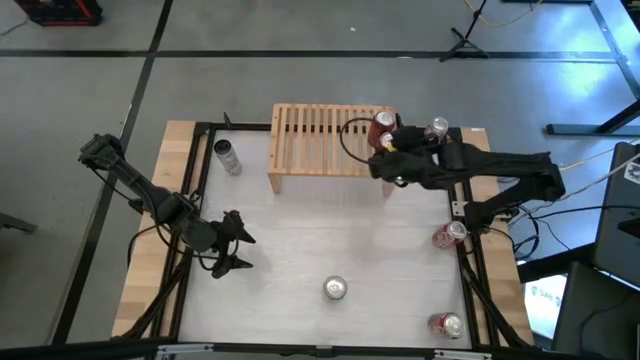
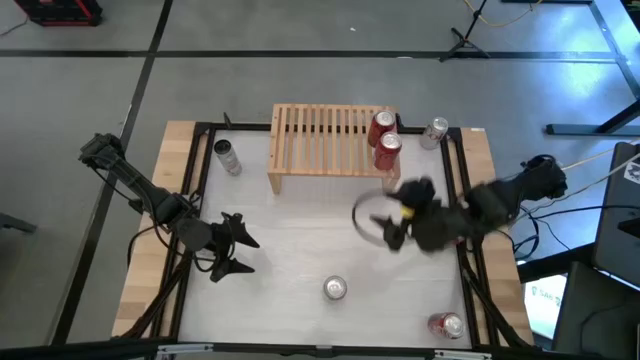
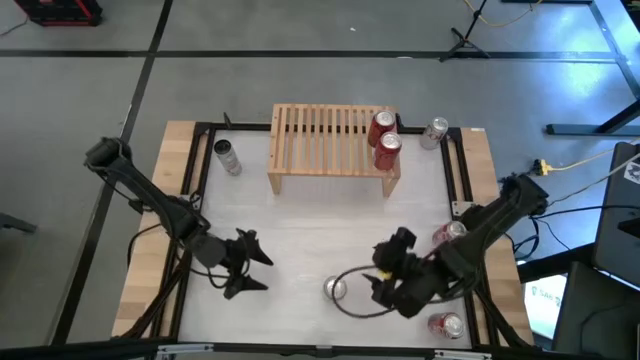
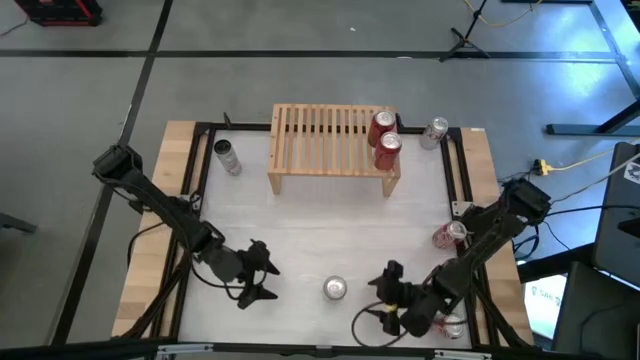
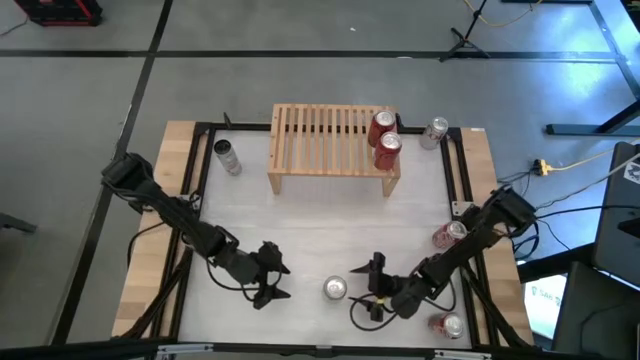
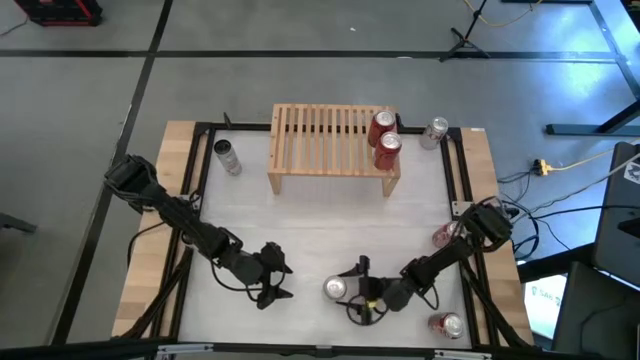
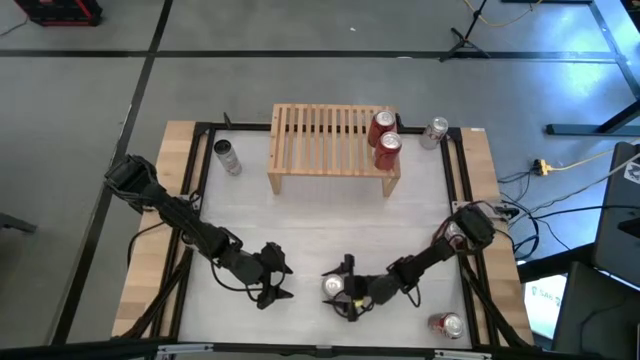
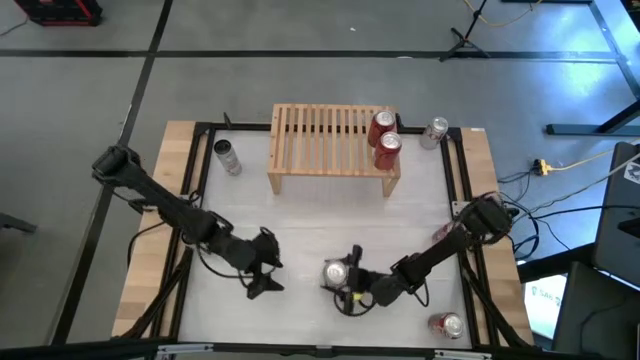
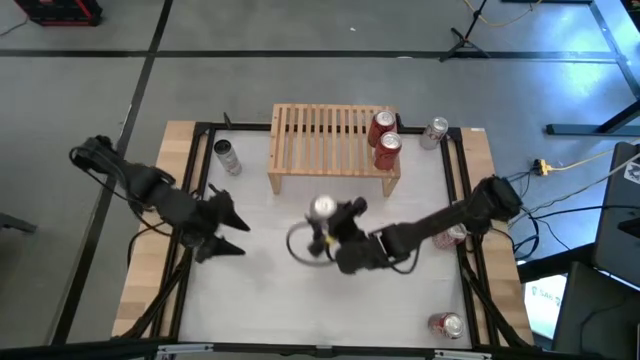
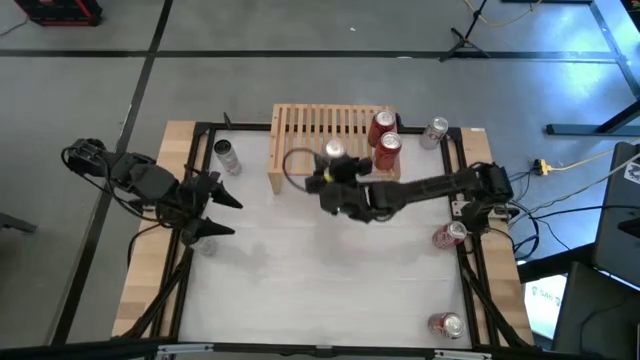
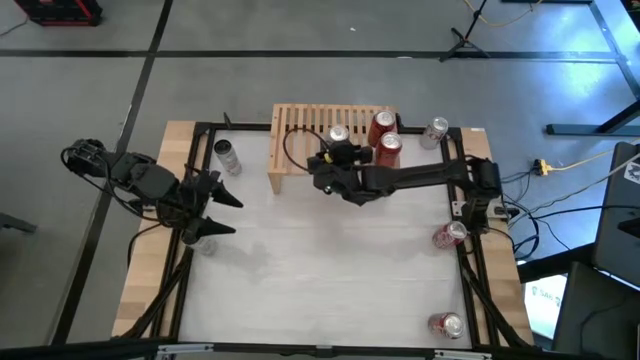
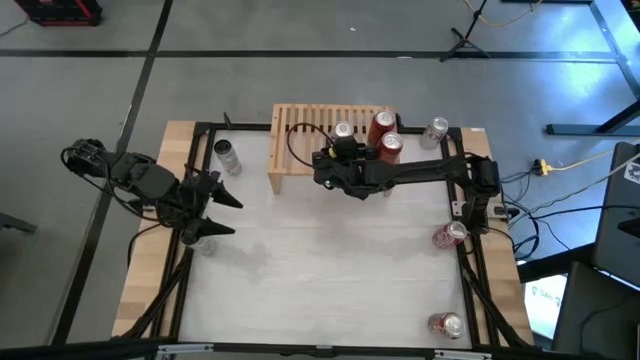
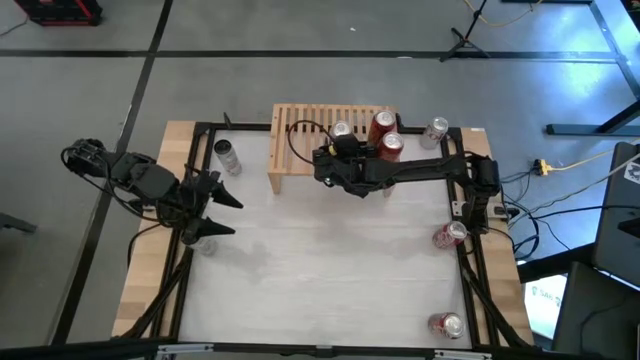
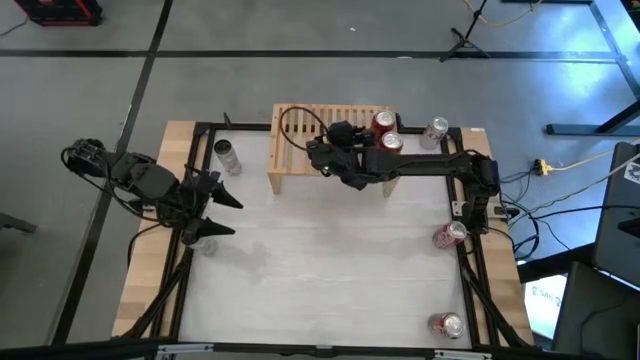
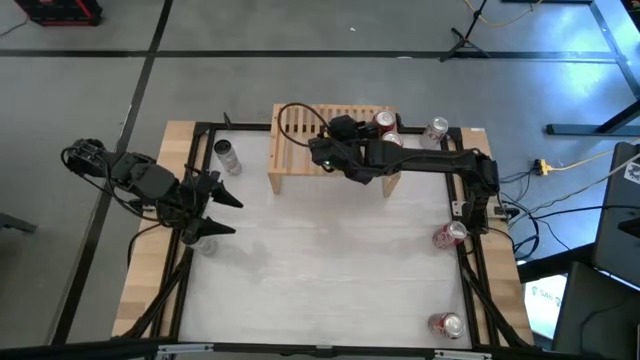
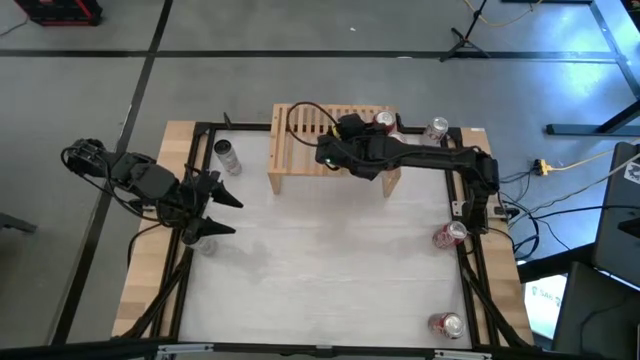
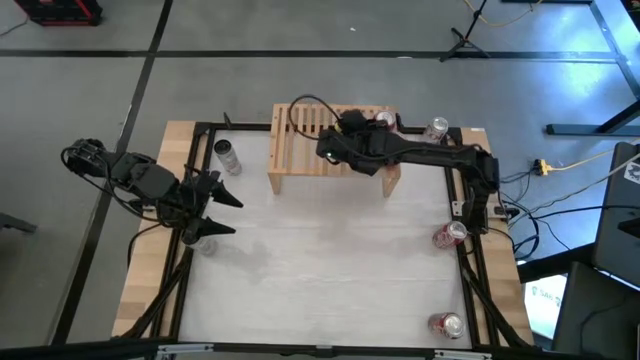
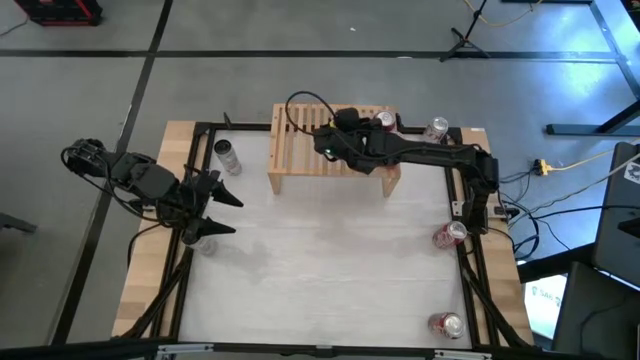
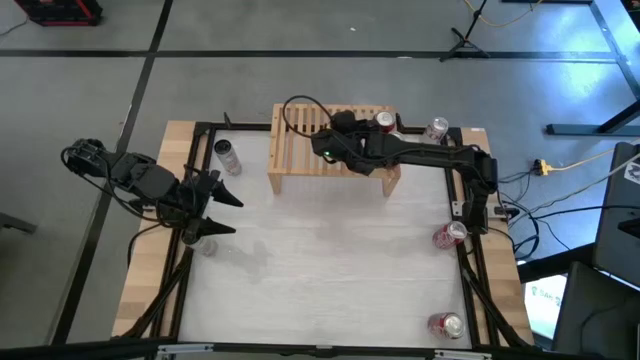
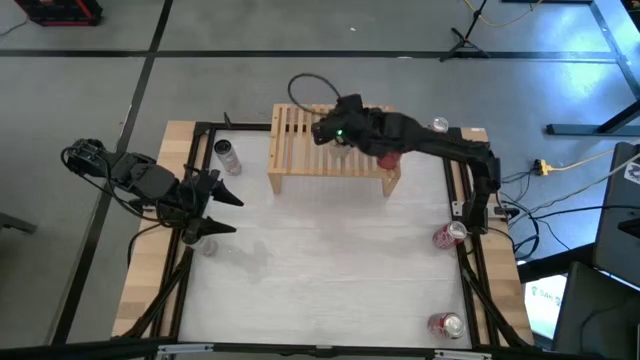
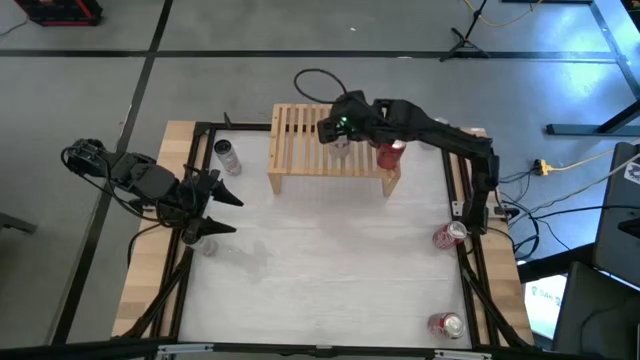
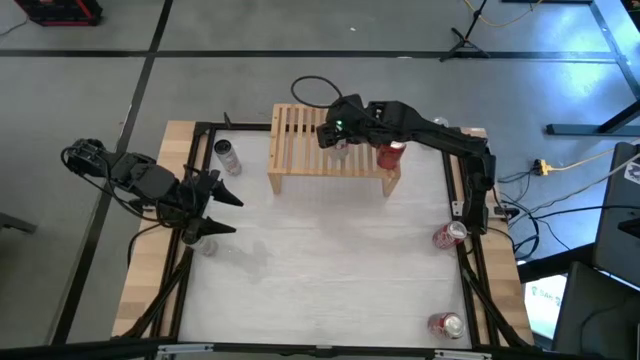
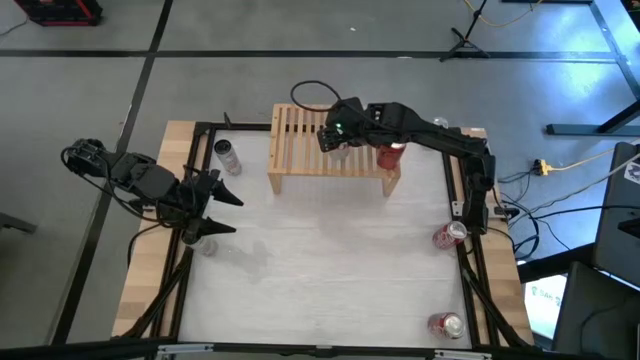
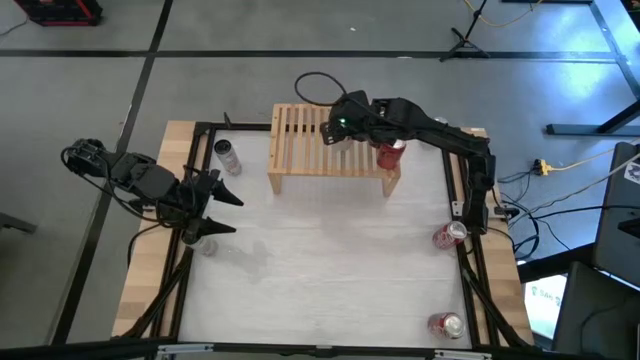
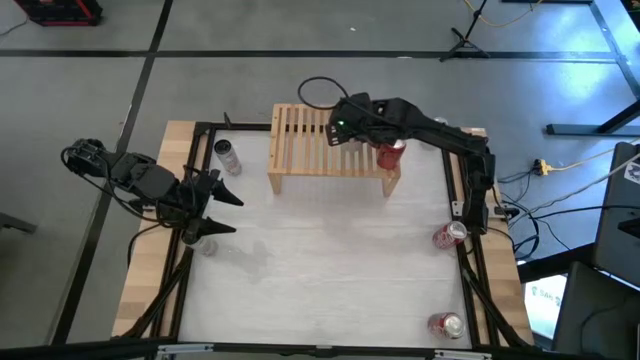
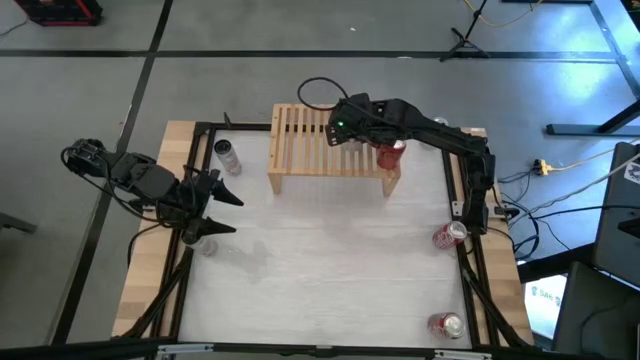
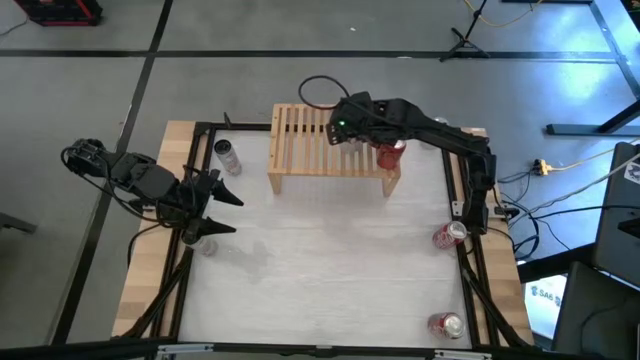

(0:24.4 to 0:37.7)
Task: Place canned beverage on shelf
Put the bottom silver soda can on the shelf
